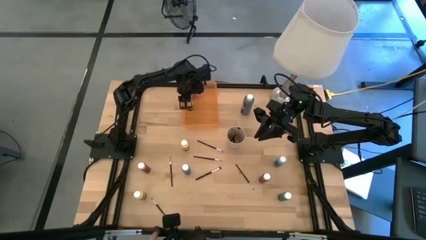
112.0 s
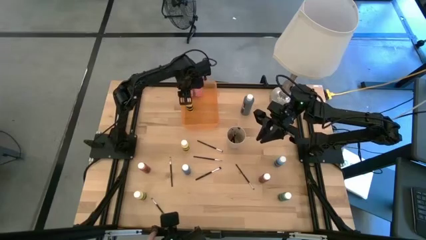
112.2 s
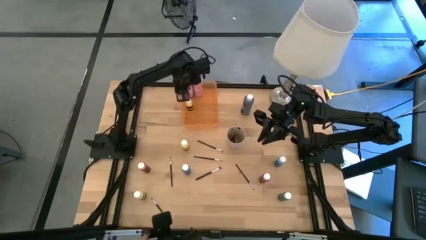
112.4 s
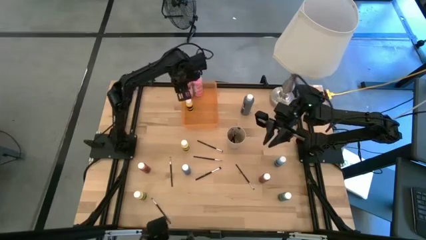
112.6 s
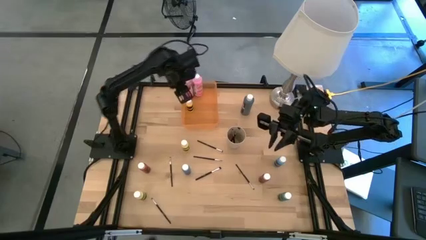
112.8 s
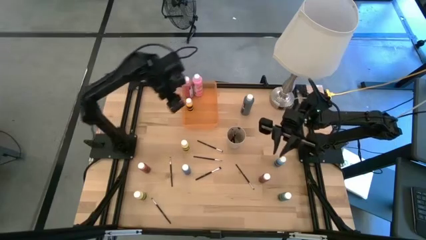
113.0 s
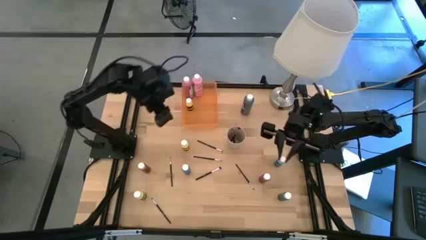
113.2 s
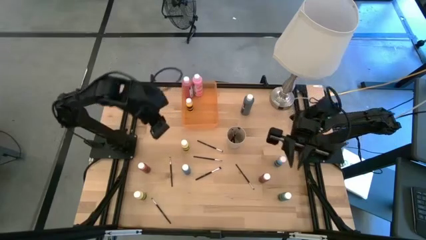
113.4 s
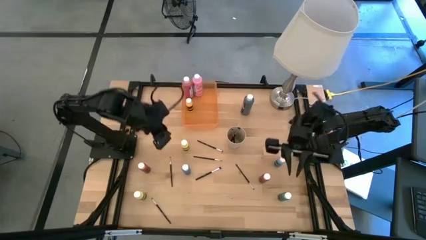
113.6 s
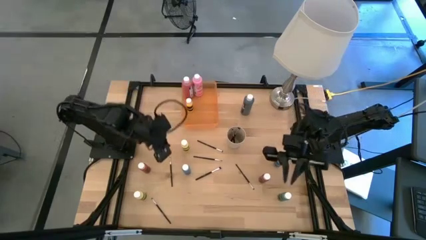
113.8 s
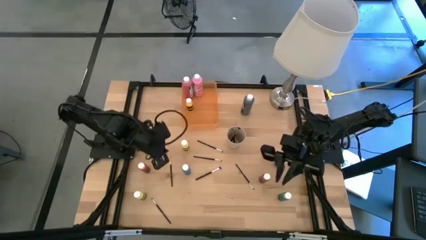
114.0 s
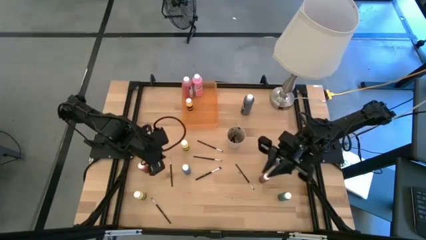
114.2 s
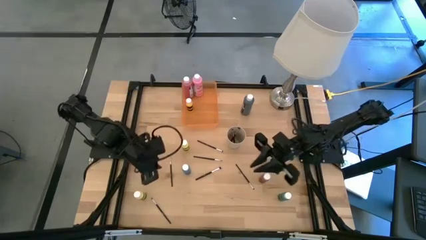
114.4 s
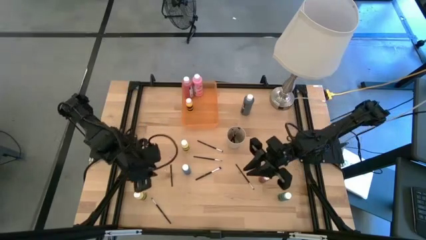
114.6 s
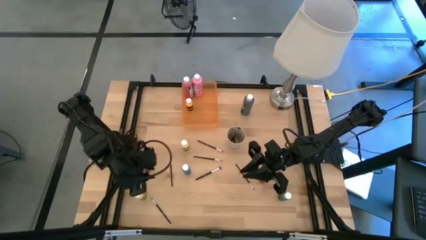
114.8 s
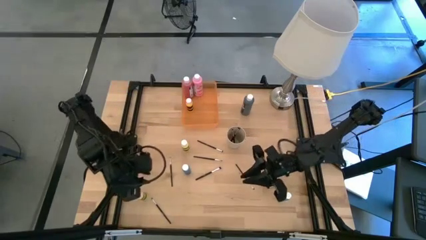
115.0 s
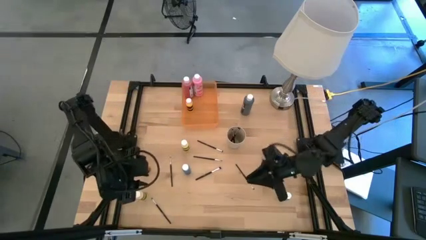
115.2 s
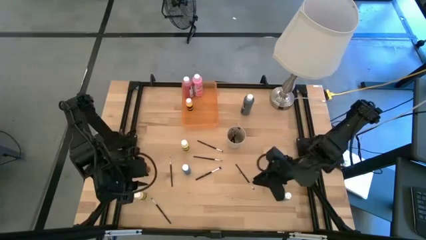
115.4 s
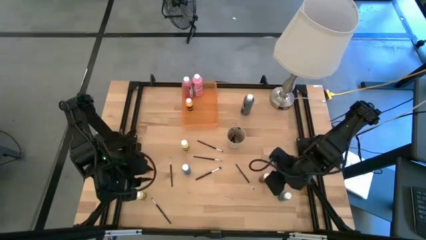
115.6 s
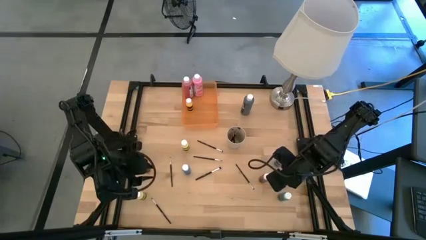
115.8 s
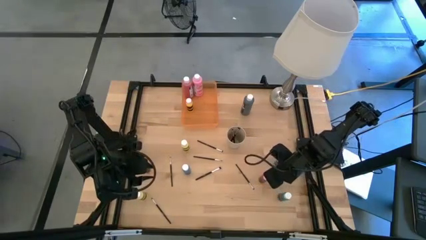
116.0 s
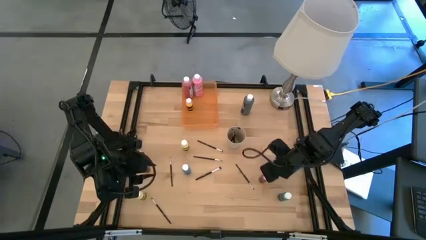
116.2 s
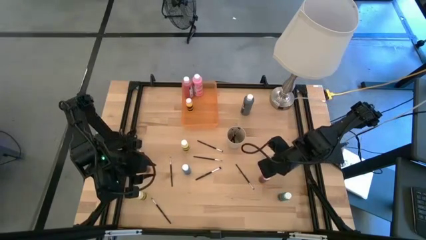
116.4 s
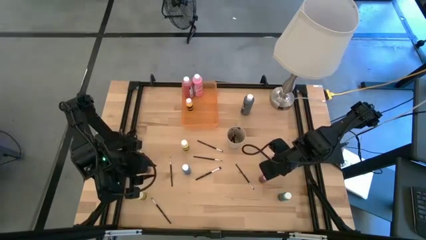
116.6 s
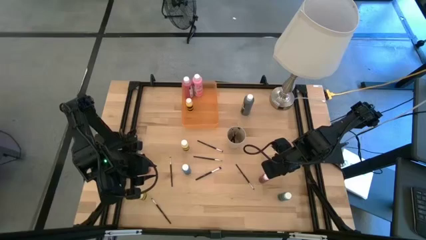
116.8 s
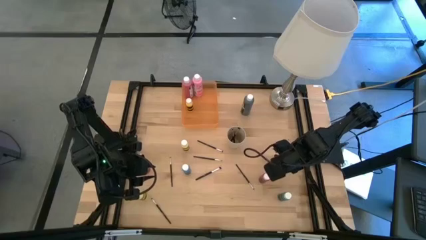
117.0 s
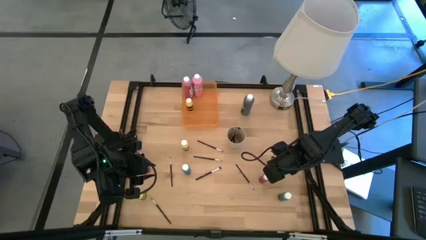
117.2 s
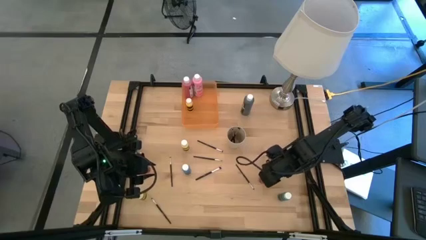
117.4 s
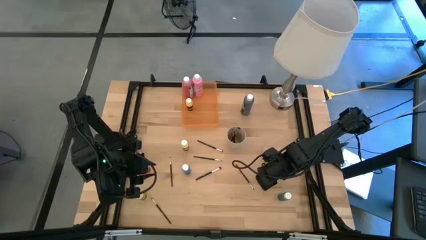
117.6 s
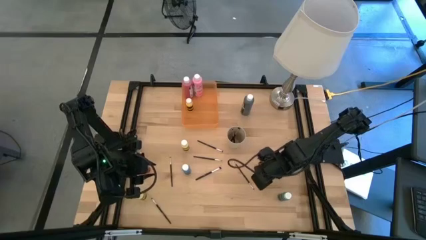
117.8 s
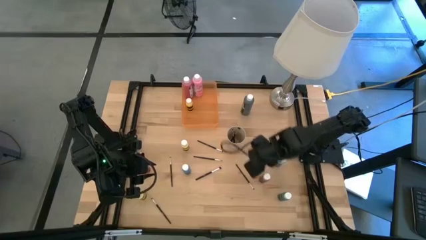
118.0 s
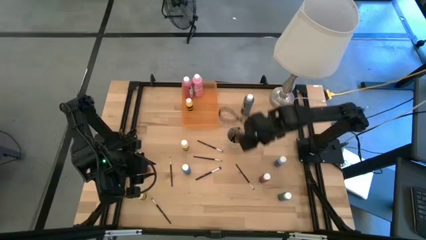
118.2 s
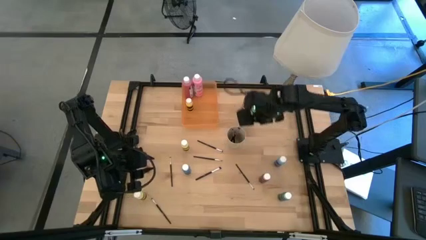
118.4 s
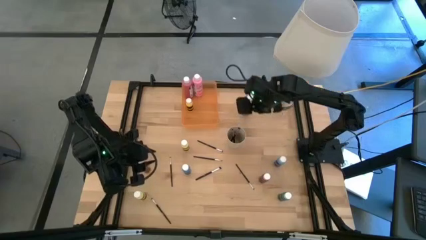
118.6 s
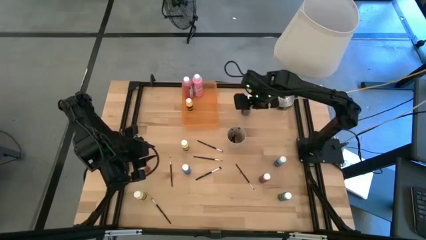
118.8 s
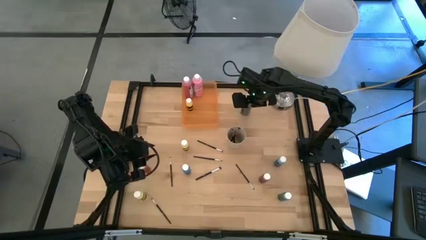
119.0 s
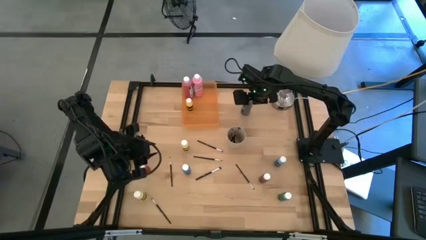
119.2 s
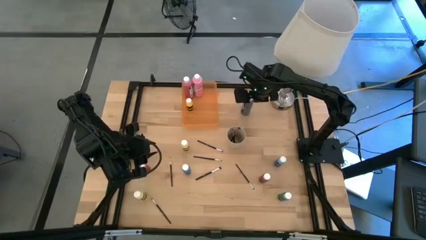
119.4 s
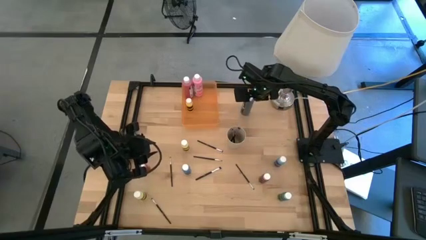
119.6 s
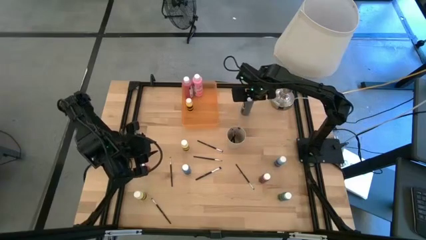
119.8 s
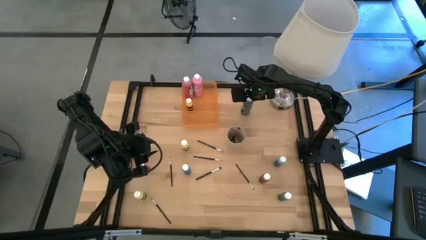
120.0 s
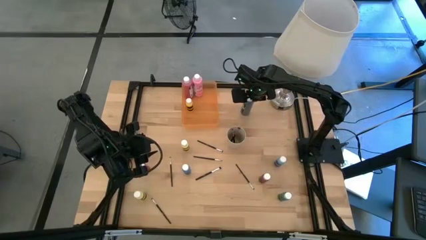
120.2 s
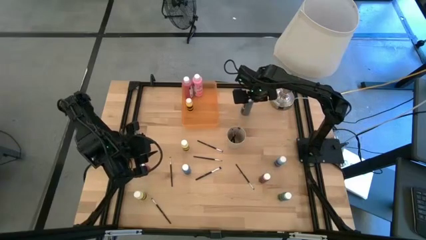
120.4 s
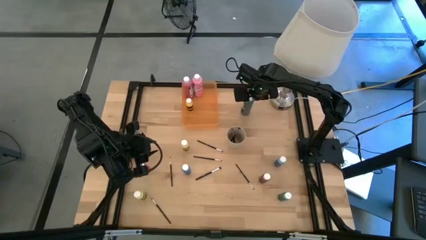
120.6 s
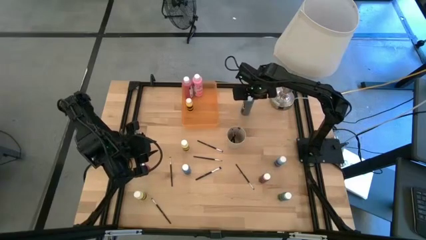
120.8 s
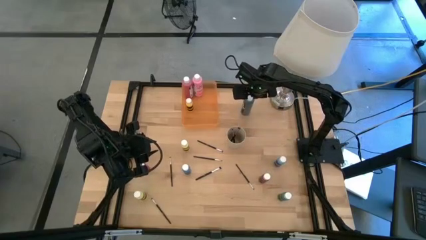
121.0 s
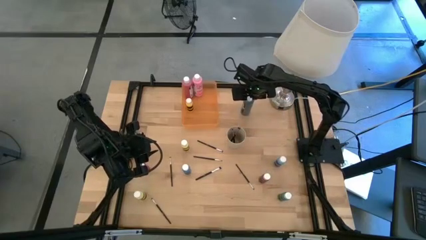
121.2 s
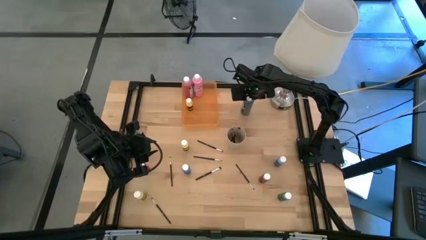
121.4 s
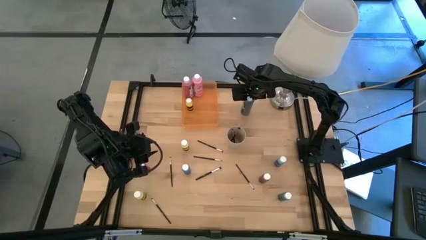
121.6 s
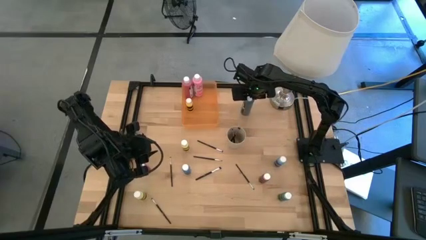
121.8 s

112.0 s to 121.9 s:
Task: Pick & Place Paint Supplies
Put the large black paint bottle into the orange bin

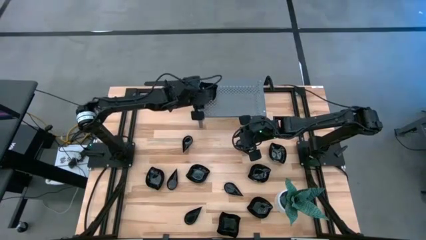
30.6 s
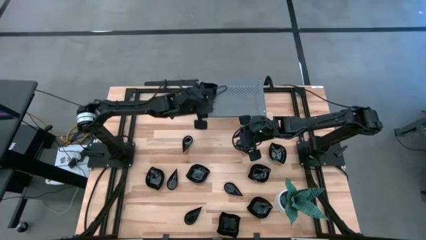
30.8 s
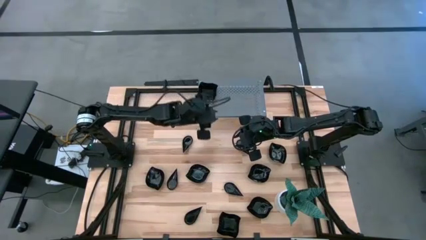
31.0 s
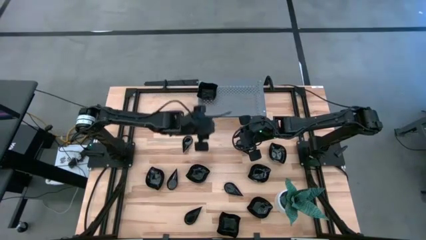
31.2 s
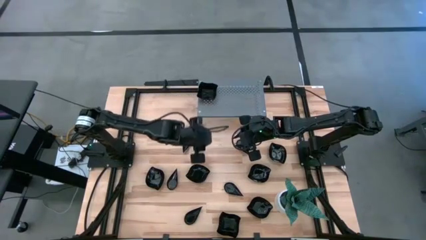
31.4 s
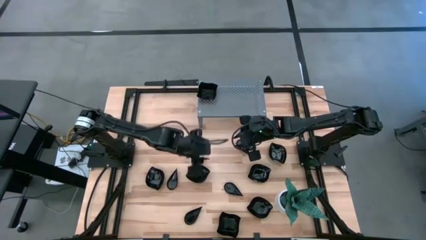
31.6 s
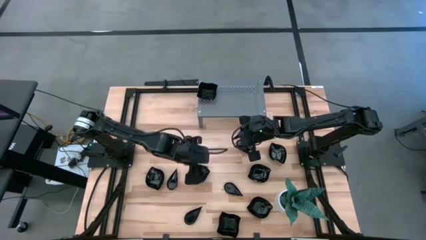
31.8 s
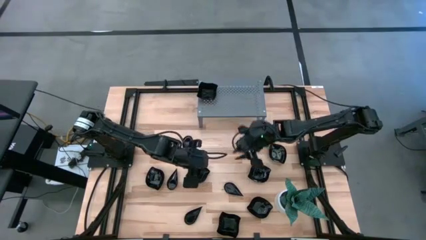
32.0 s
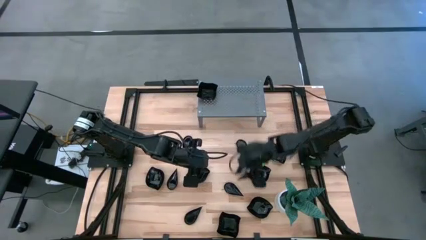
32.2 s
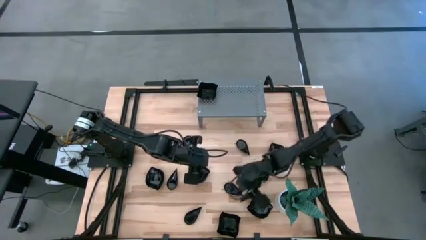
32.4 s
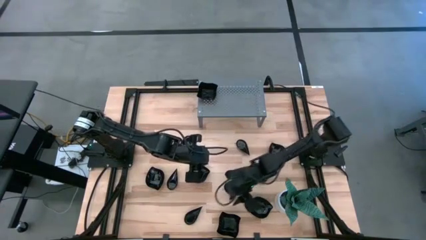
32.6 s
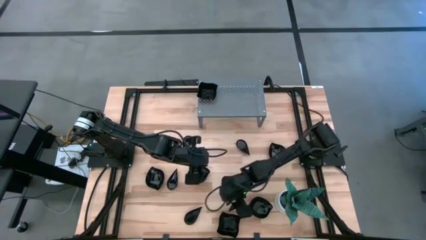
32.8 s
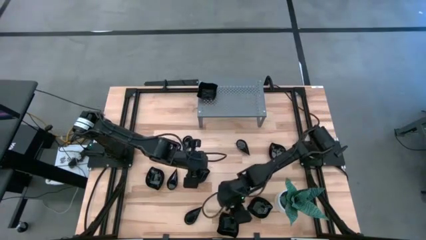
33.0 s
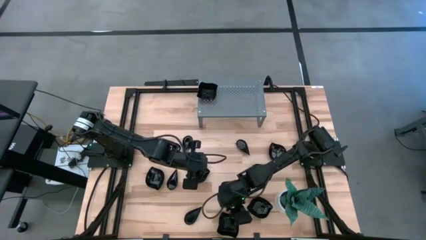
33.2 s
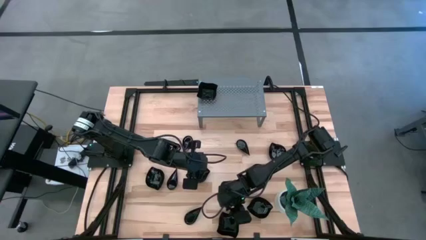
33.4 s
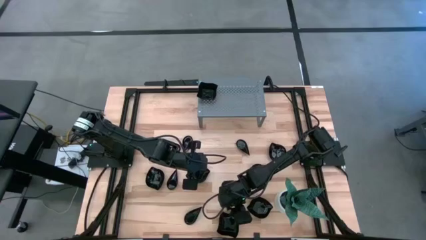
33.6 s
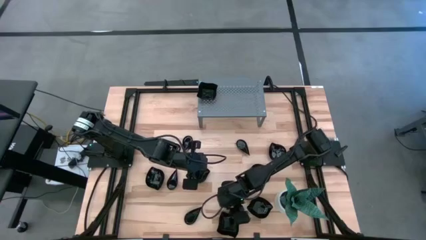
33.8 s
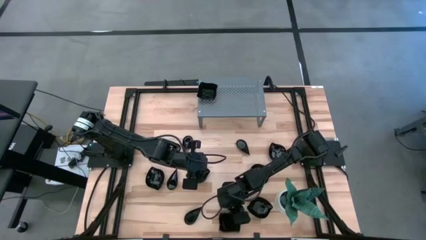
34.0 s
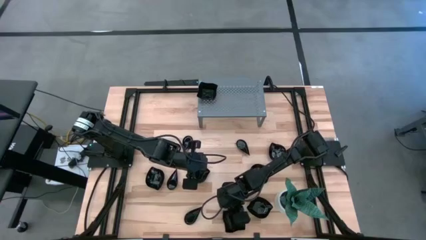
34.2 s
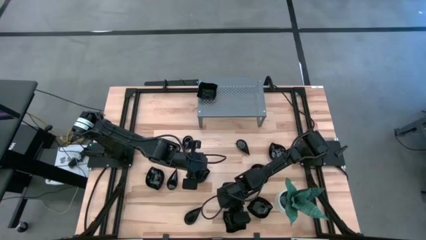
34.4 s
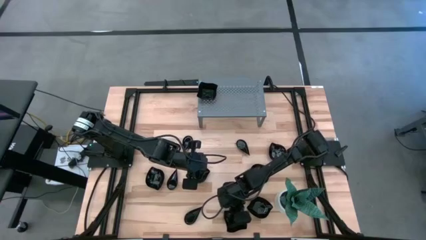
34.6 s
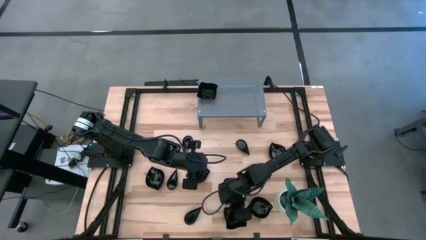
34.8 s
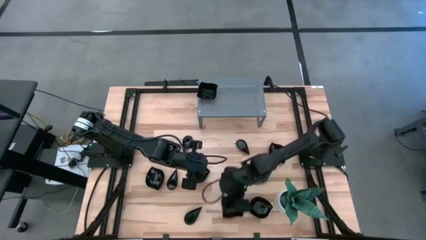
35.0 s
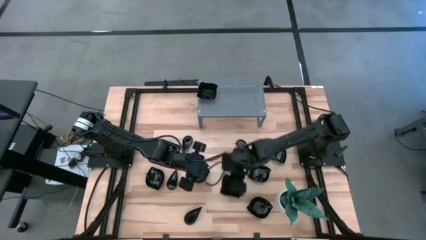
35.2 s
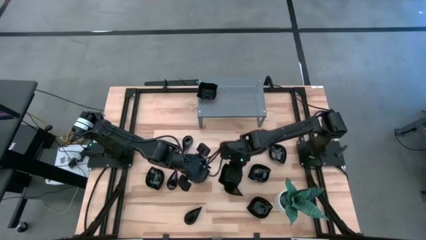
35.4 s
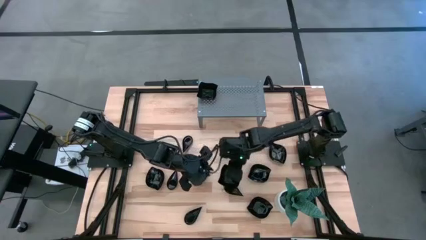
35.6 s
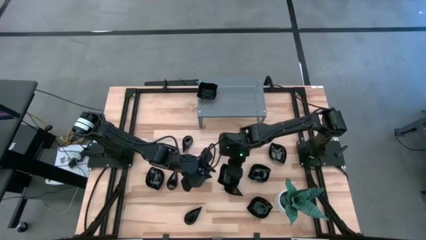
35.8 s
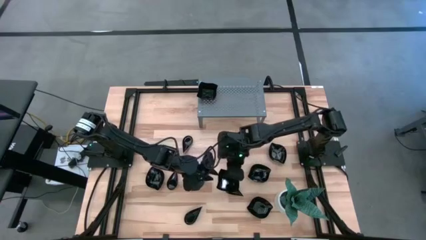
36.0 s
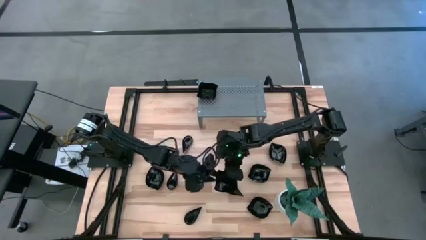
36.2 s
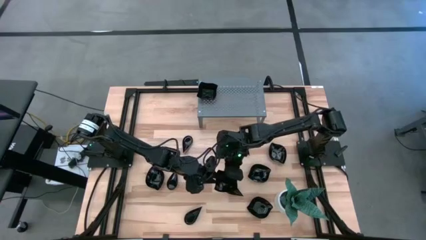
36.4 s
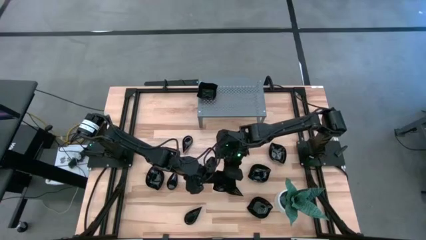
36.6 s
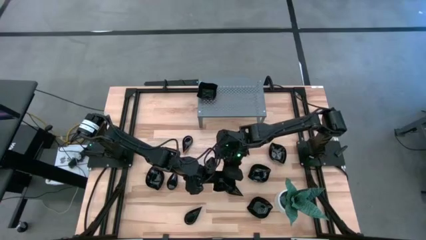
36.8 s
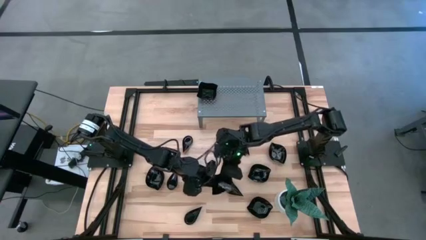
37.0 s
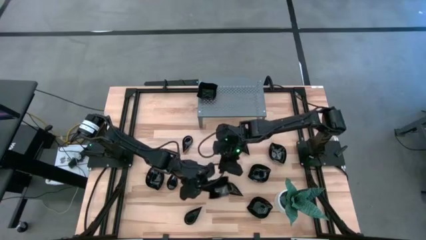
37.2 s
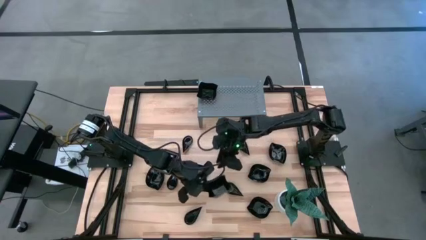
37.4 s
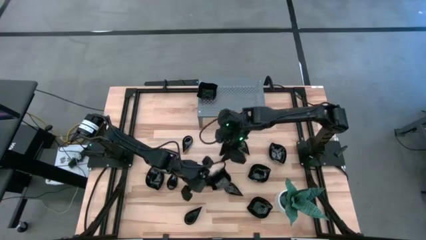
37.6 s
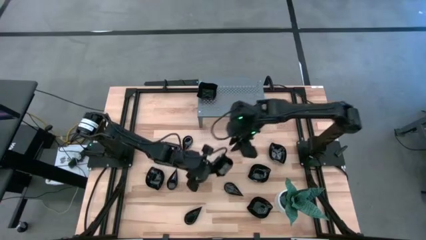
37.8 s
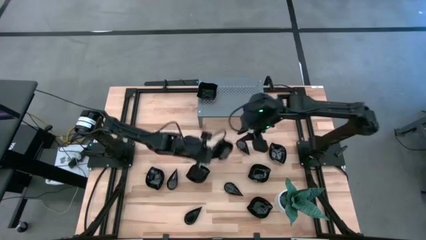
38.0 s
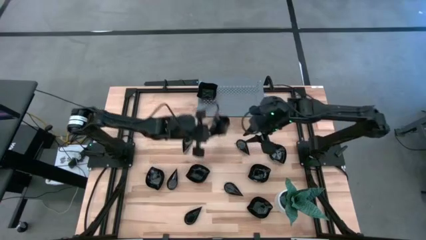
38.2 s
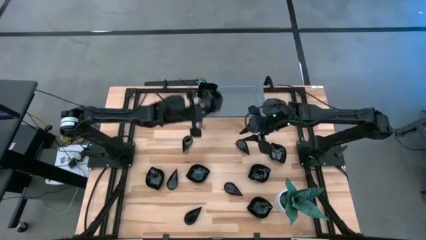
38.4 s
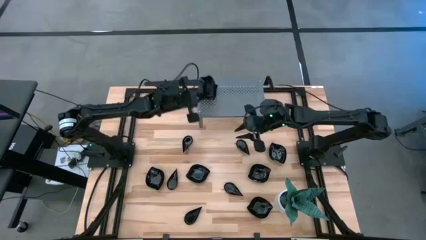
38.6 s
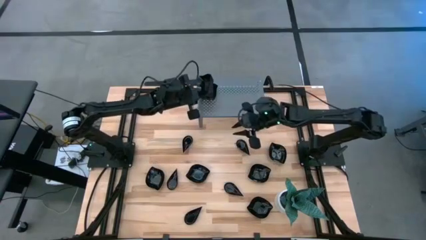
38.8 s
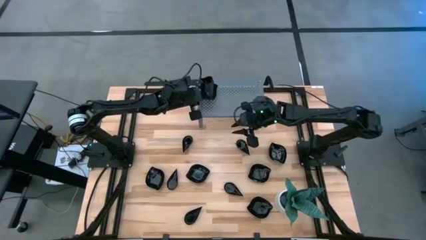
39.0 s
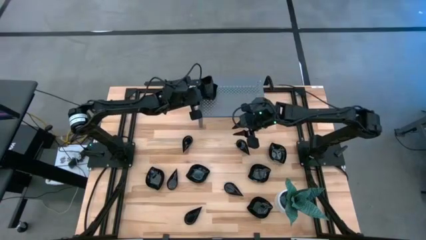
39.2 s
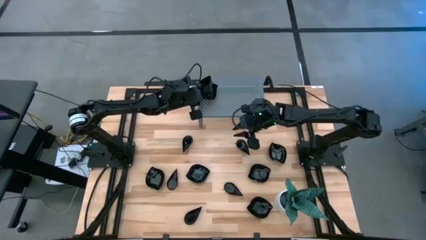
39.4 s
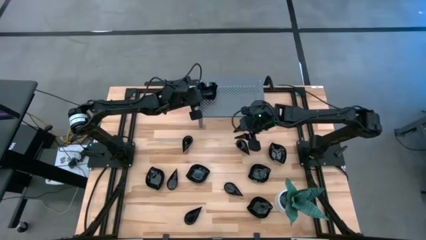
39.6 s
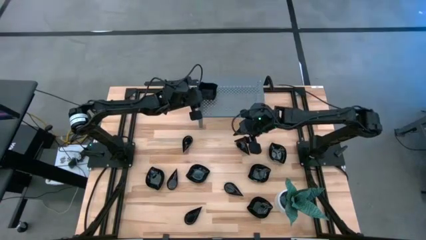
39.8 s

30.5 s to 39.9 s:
Task: Pick & Place Mini shaped plates
Stack the distorted square plate on top of the distorted plate on the shelf
